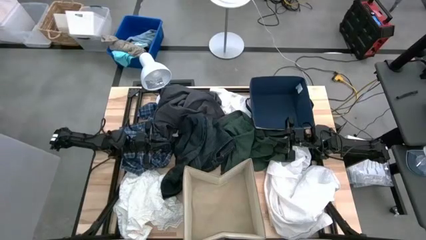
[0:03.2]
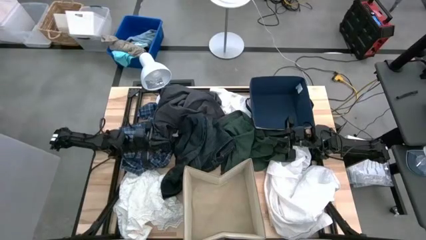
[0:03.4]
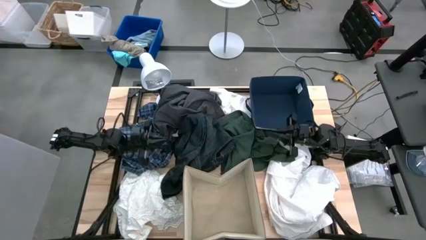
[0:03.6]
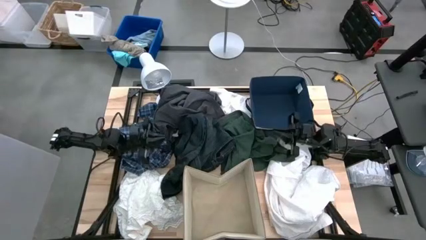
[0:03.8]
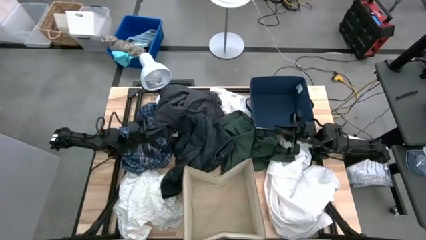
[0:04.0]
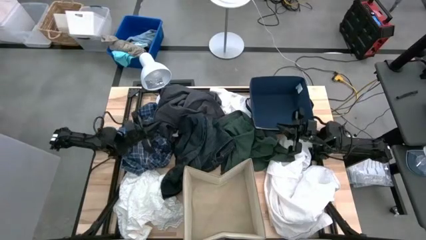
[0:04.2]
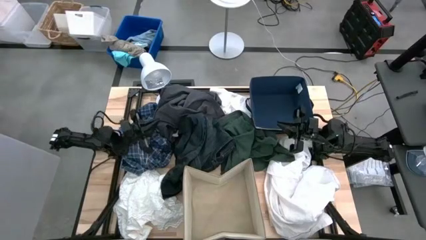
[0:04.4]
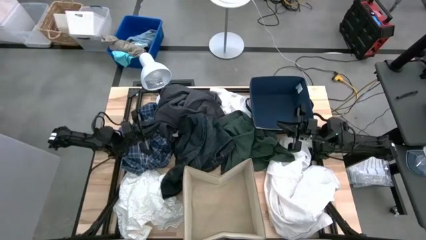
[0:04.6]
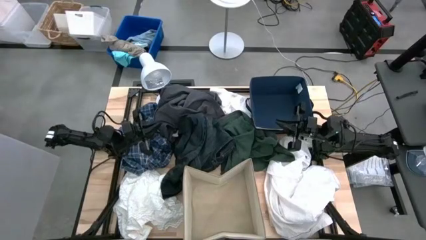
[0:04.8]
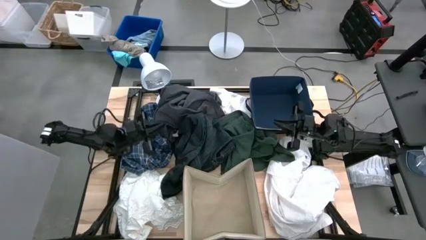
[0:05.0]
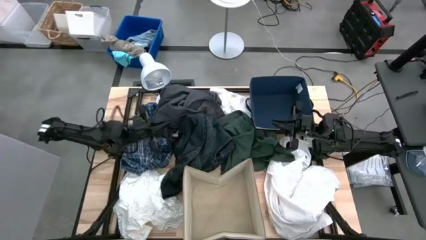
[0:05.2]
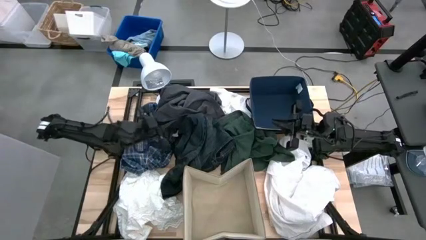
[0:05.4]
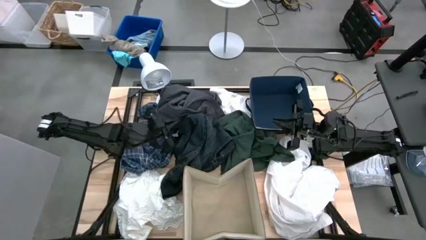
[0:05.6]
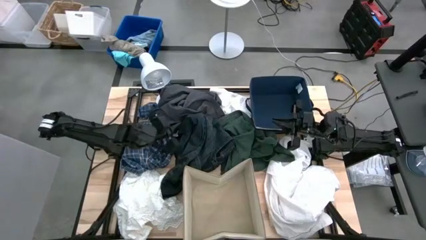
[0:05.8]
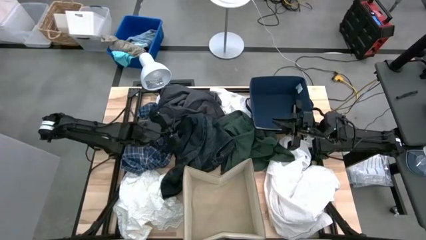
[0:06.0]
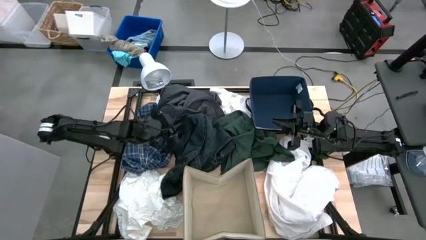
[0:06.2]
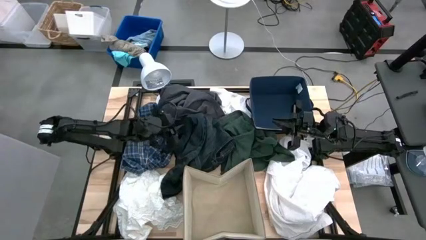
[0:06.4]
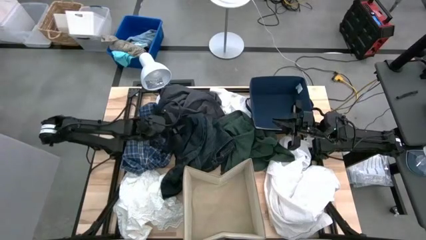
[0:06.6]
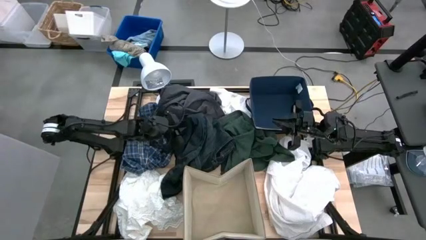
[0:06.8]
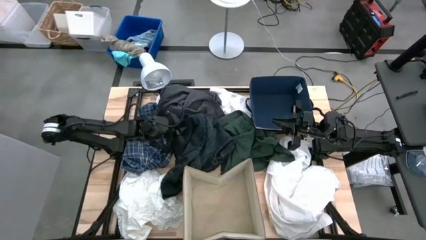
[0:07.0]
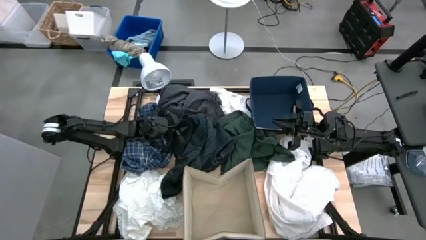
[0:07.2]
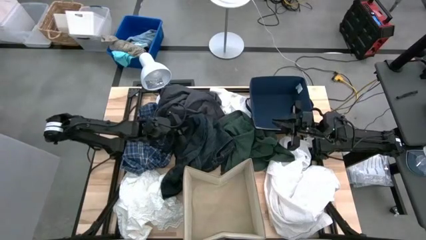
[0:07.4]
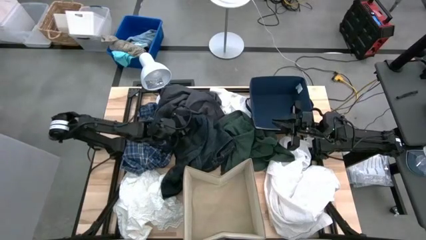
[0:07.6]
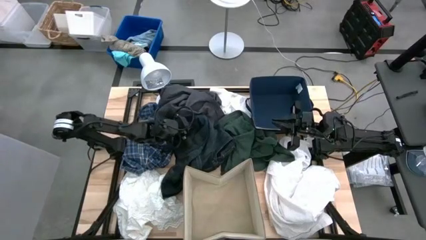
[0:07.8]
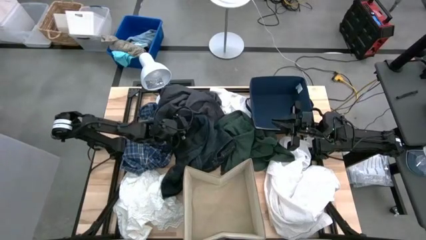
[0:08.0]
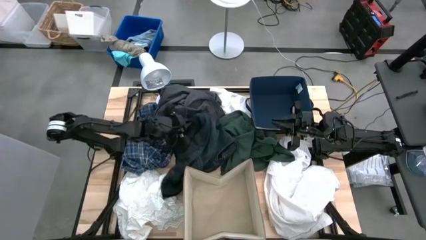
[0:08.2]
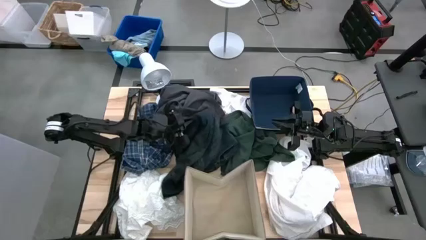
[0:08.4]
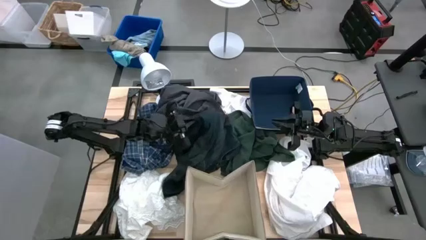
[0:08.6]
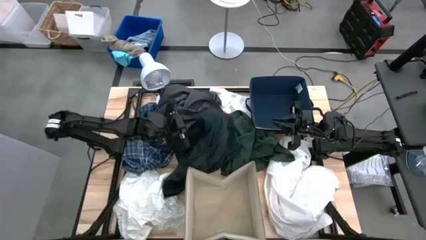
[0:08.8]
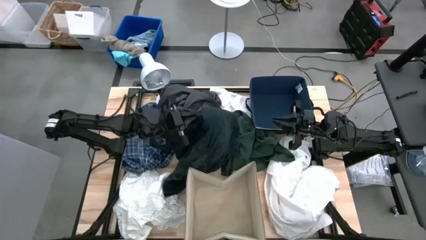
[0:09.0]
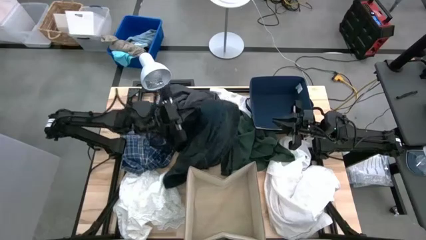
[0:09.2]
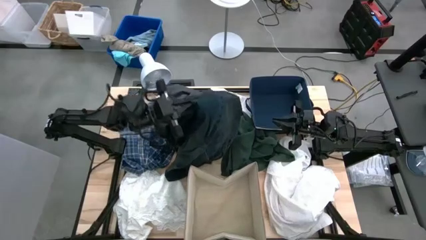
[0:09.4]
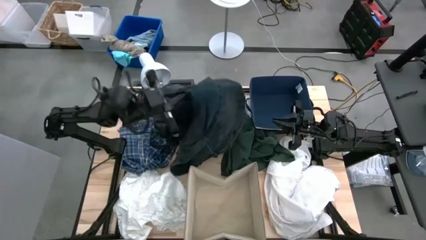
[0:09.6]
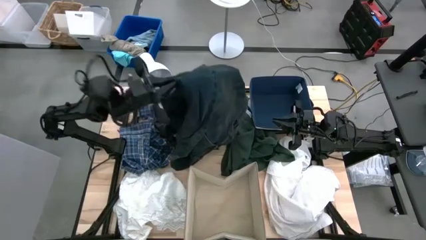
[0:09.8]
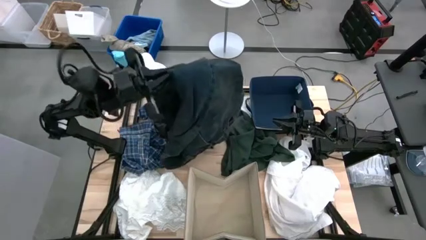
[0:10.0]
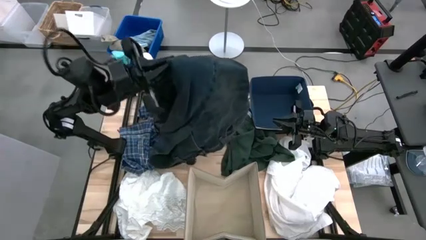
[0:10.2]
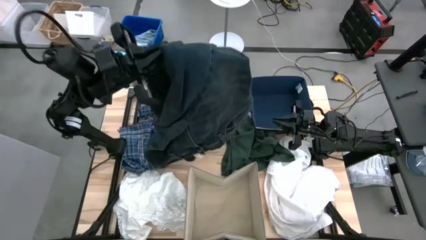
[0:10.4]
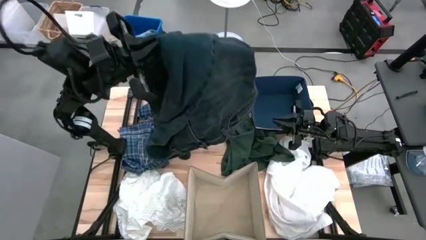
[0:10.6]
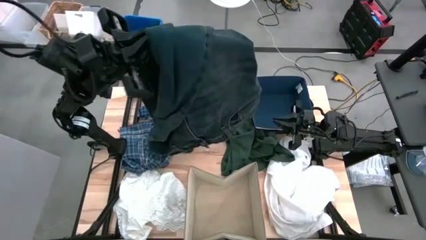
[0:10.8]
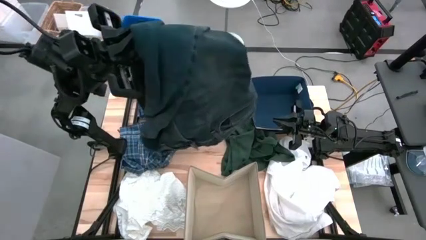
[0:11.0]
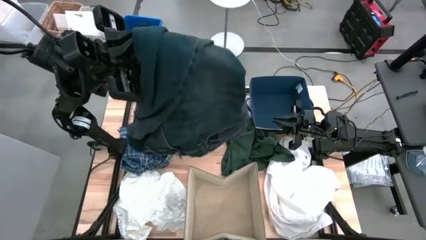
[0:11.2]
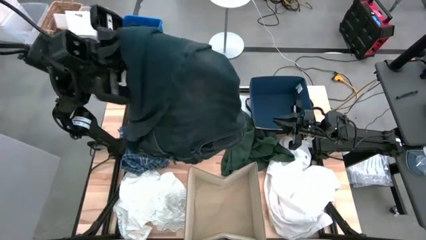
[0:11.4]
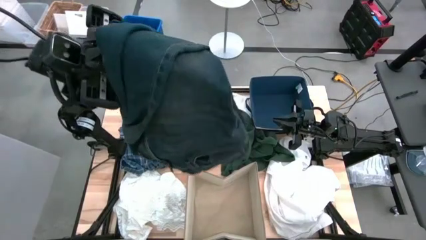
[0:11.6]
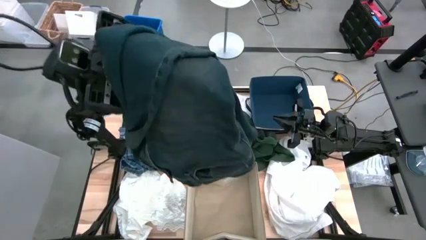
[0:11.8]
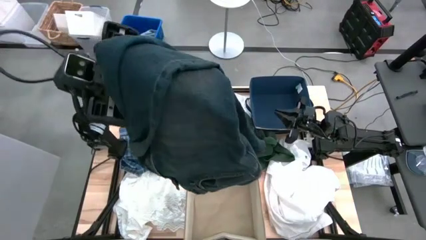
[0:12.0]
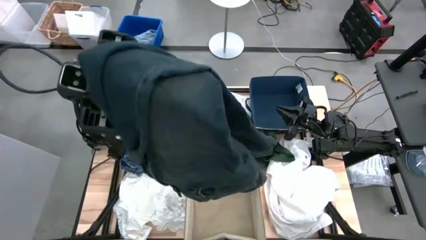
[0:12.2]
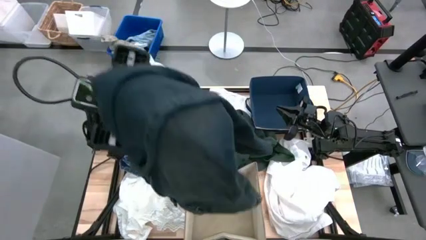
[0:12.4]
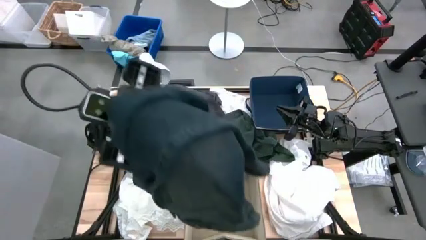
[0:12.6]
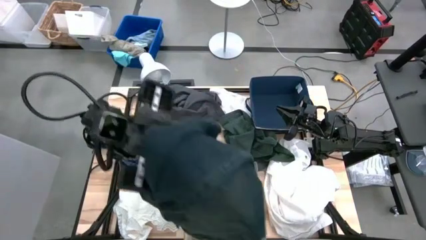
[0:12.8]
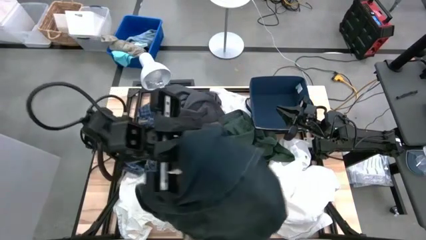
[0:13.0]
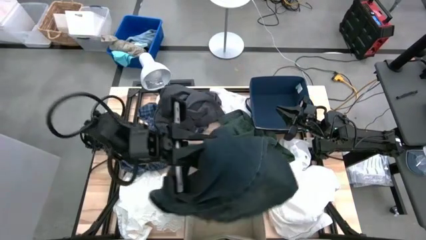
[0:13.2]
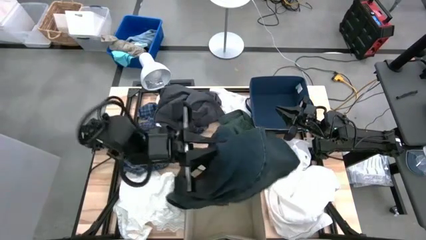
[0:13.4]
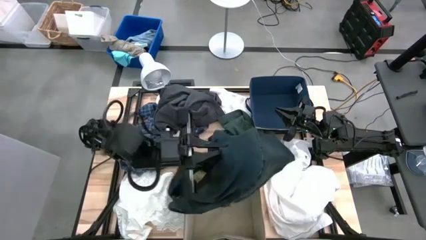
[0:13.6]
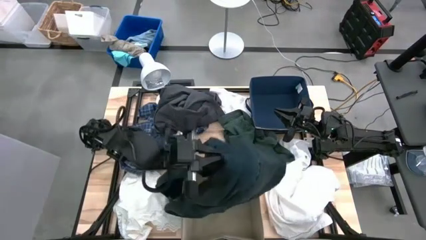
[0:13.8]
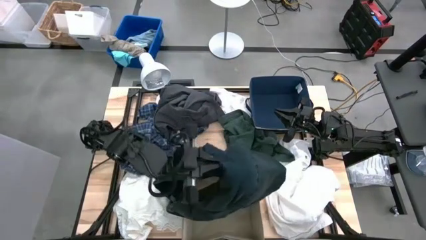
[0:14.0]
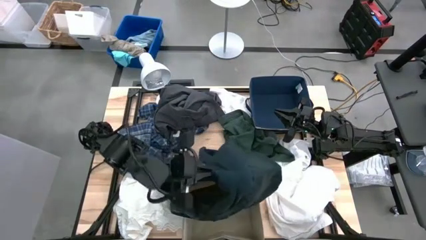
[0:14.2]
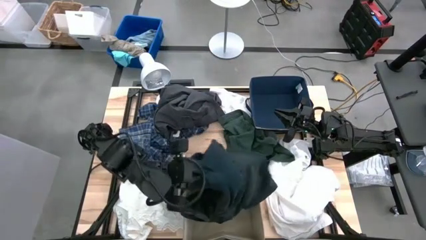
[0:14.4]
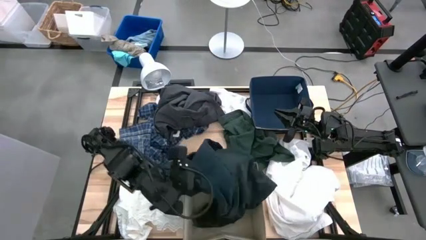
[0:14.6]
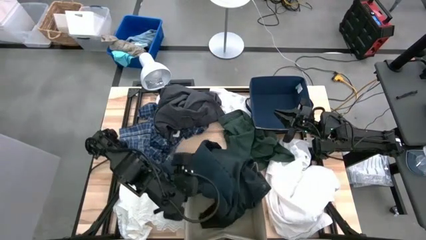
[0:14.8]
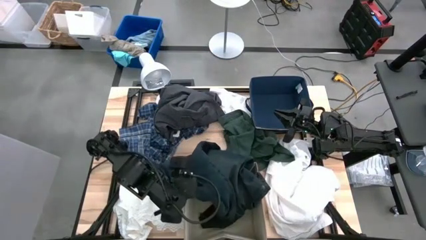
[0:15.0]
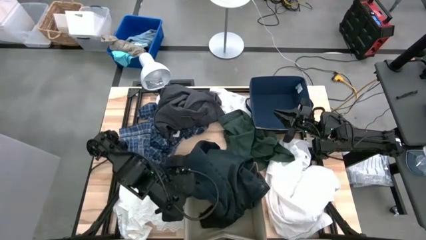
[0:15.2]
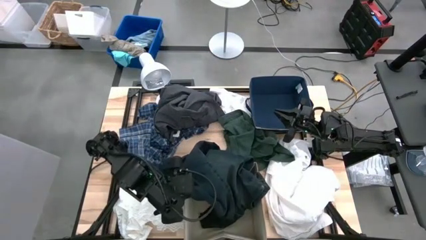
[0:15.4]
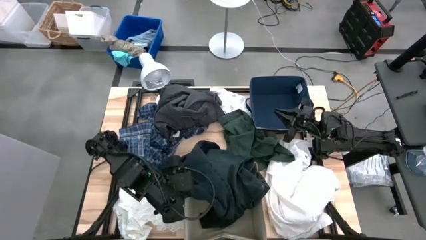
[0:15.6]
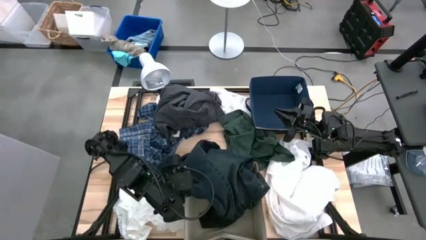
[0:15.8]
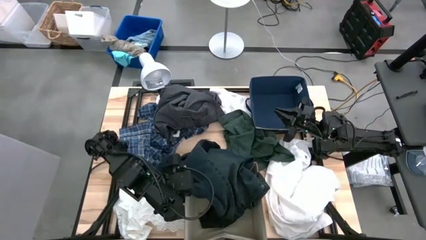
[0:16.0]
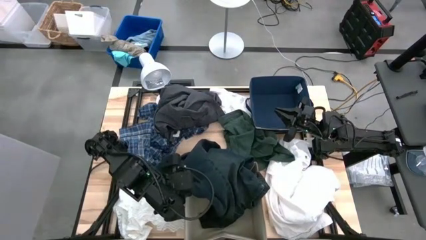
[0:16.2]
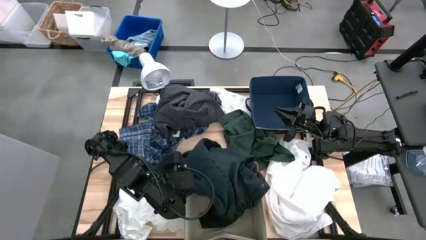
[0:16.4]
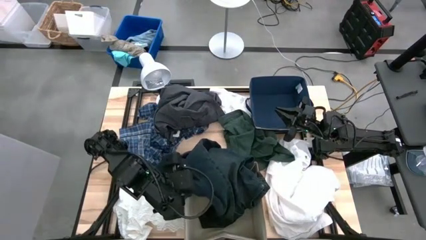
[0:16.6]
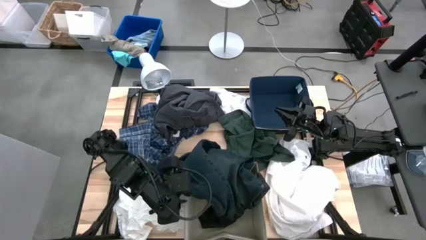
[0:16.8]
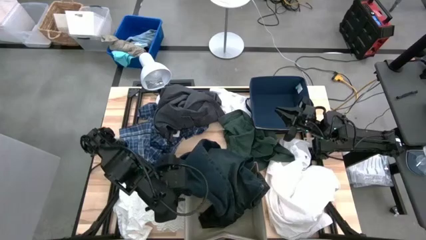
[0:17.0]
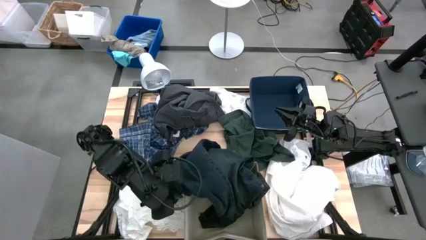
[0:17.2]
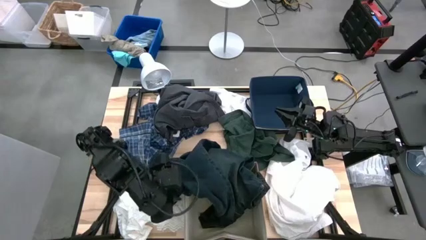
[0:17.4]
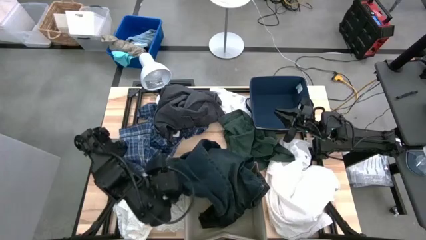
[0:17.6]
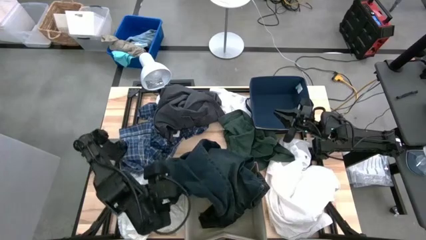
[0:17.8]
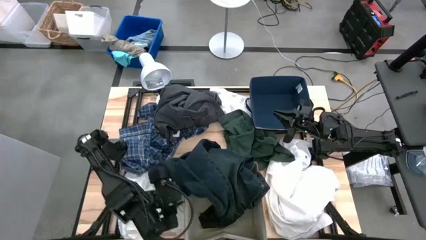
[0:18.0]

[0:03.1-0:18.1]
Task: Sort clothes
Put the dark blue pants into the brown laundry organizer
